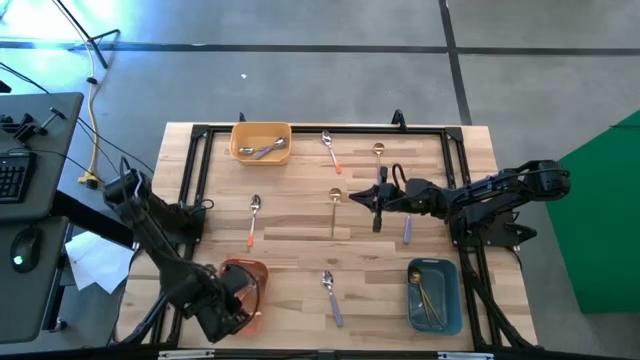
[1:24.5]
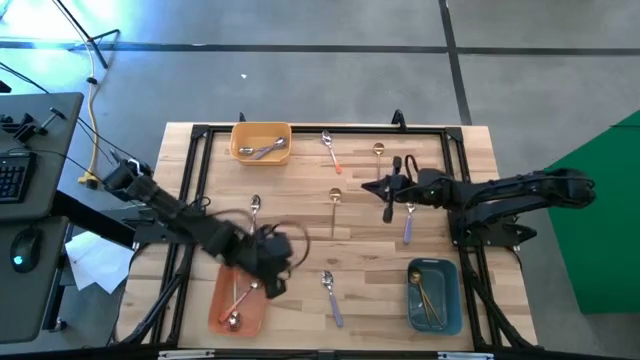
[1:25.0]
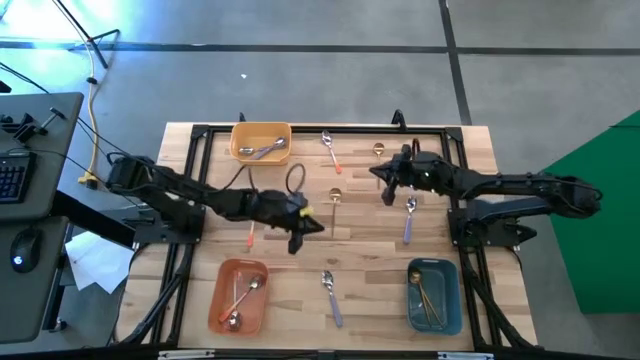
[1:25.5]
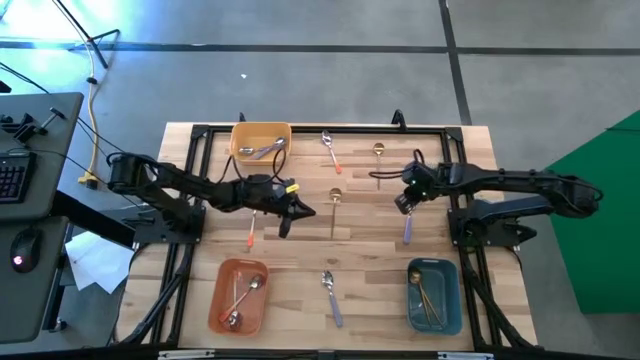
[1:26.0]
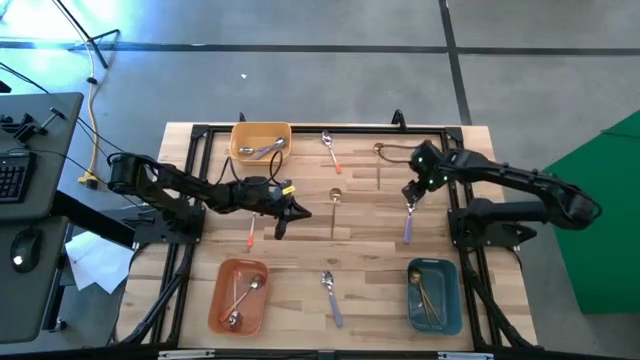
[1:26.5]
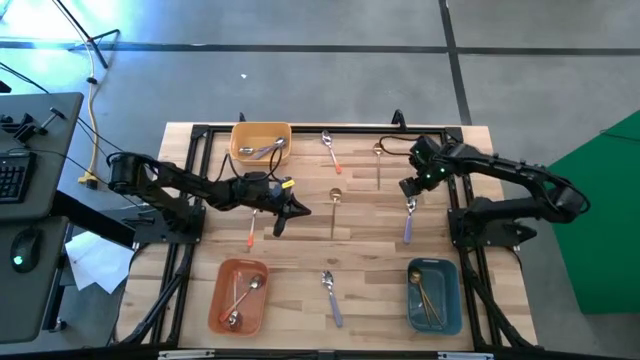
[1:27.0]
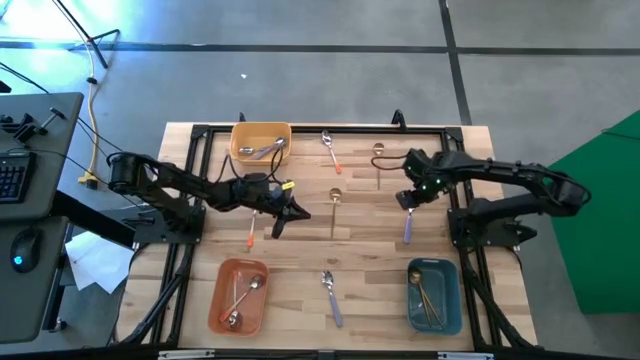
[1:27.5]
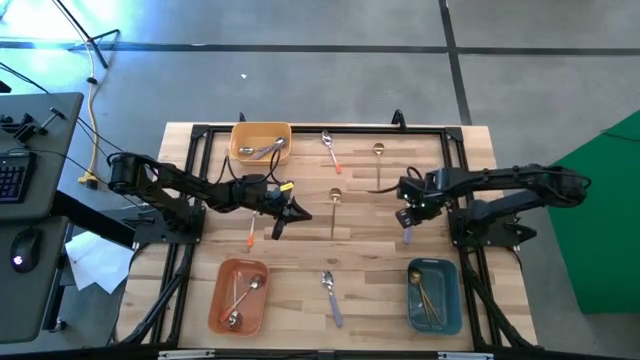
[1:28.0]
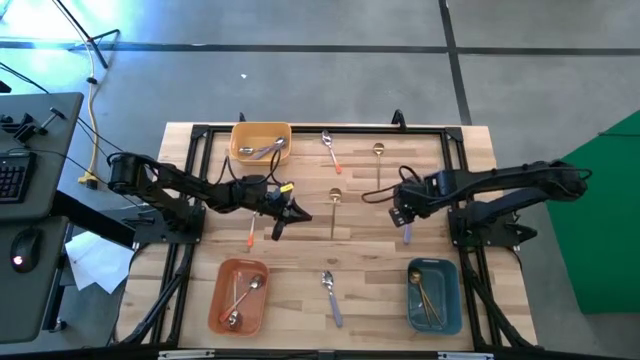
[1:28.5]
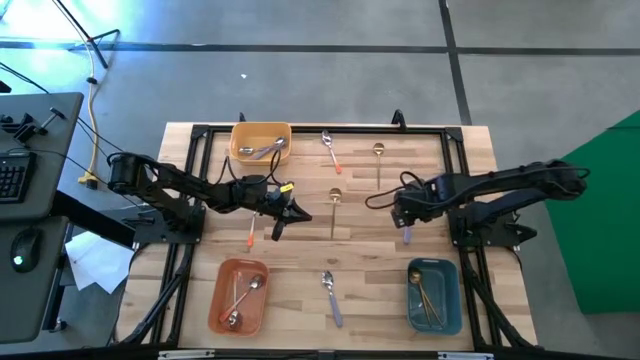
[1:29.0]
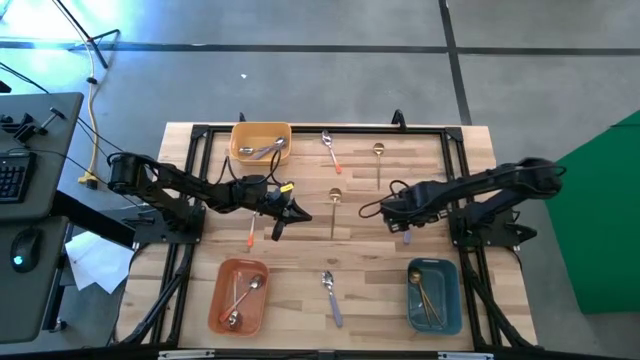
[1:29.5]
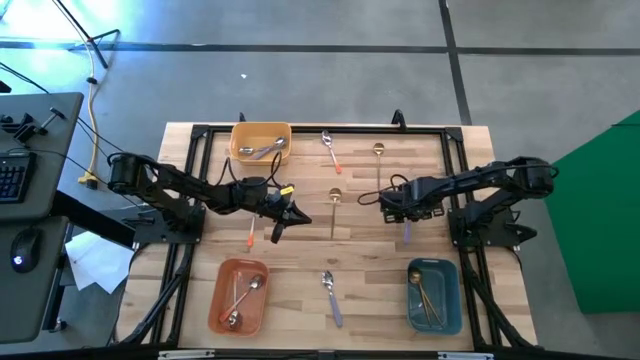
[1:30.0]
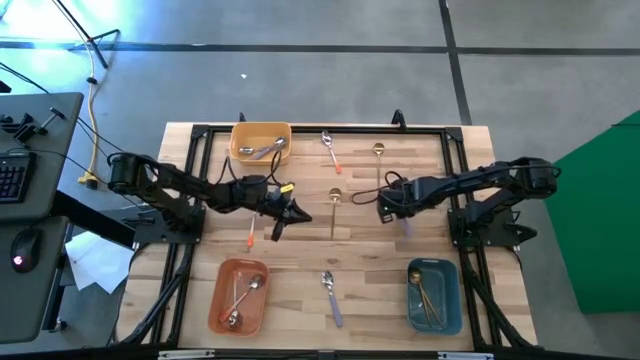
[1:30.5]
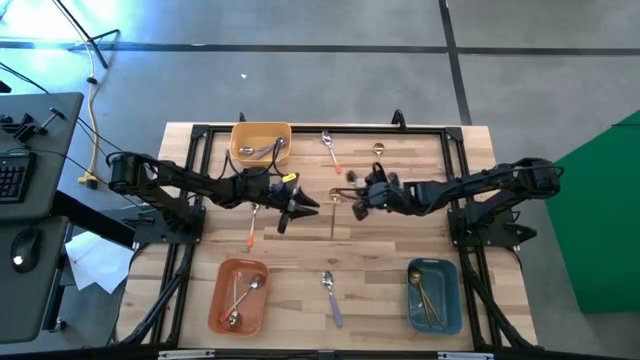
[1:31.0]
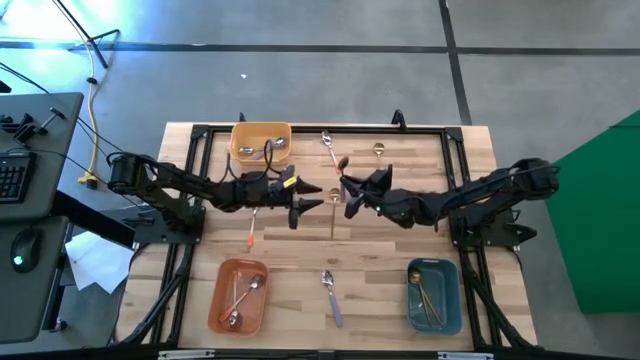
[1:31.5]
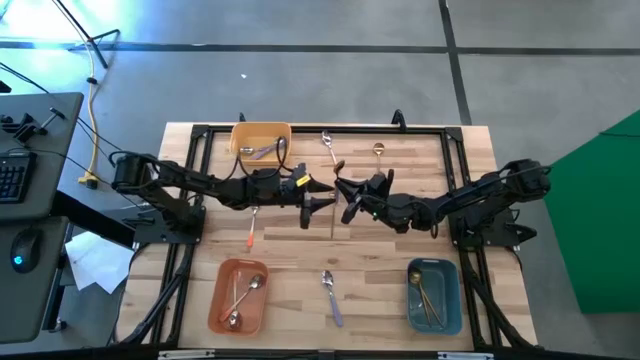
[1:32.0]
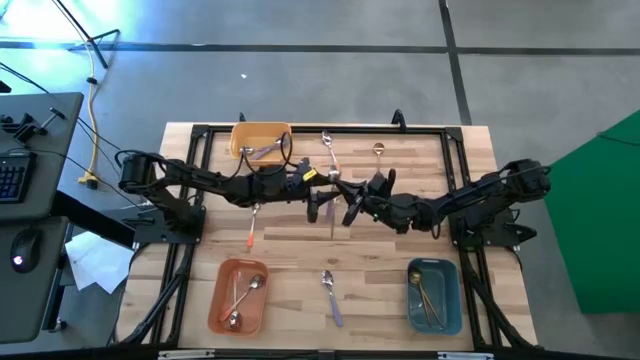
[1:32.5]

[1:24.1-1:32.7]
Task: Sort silverware by color (type)
Put the purple spoon into the yellow bin

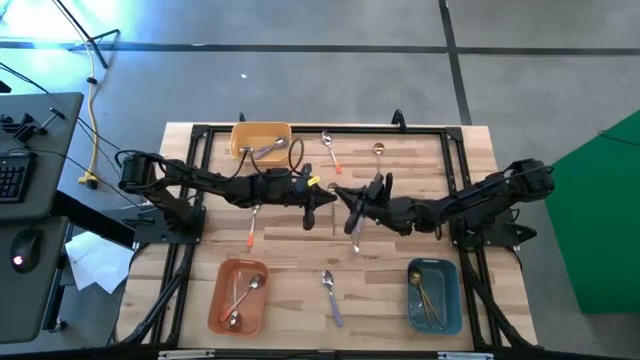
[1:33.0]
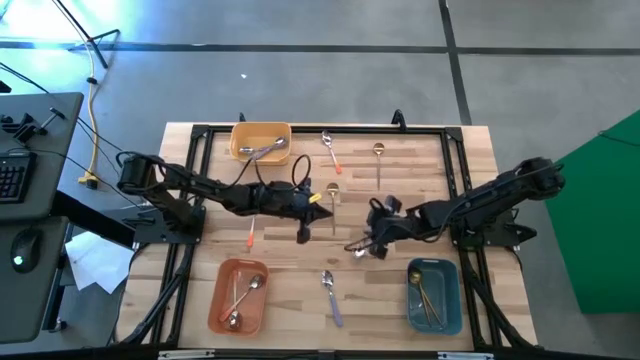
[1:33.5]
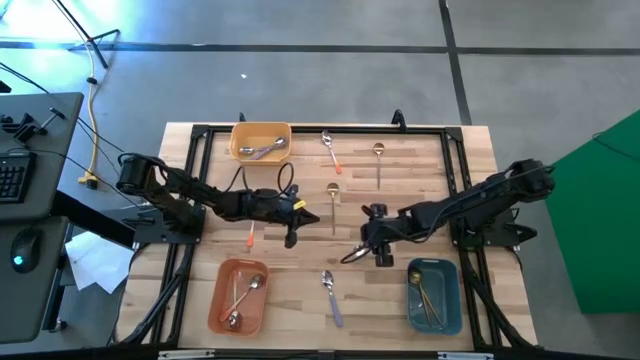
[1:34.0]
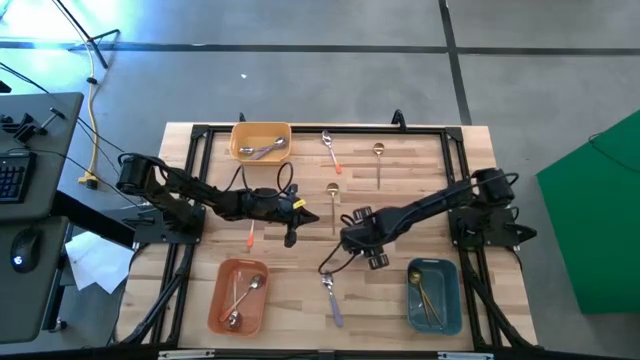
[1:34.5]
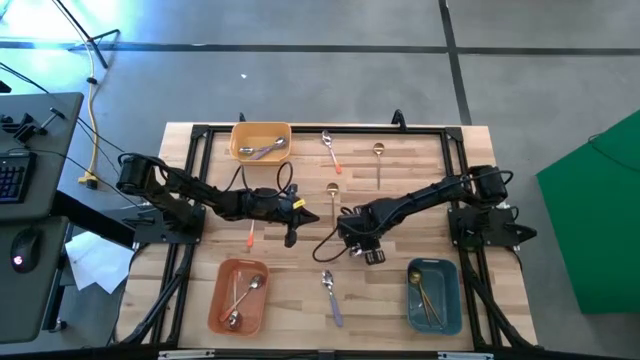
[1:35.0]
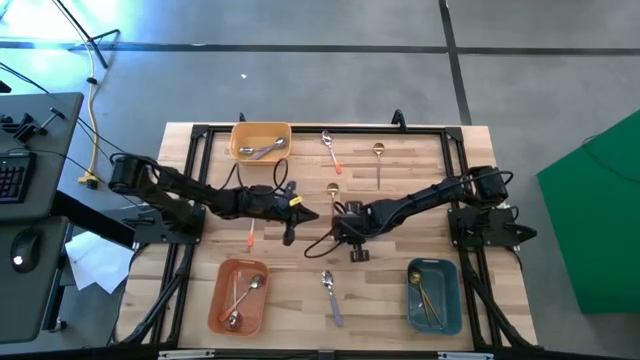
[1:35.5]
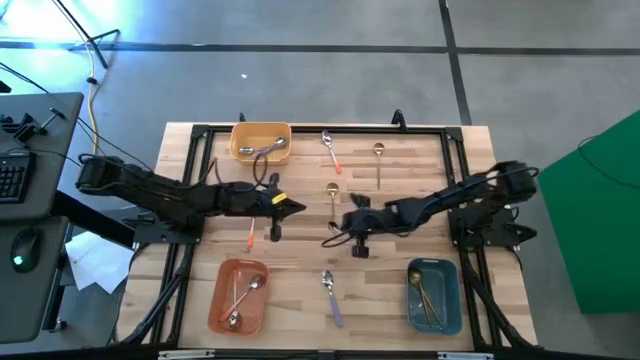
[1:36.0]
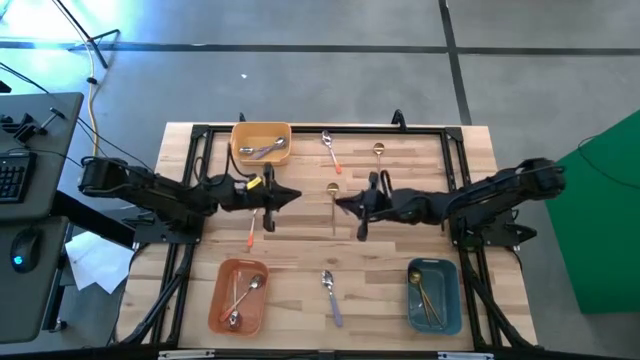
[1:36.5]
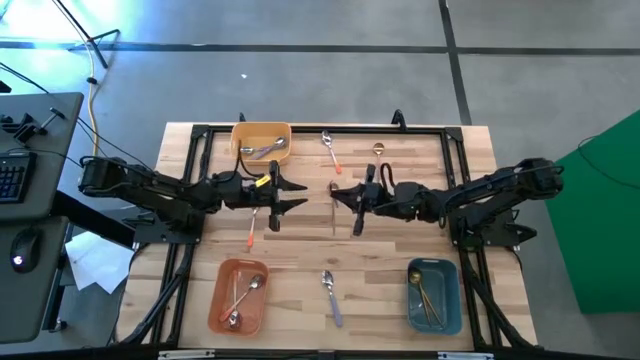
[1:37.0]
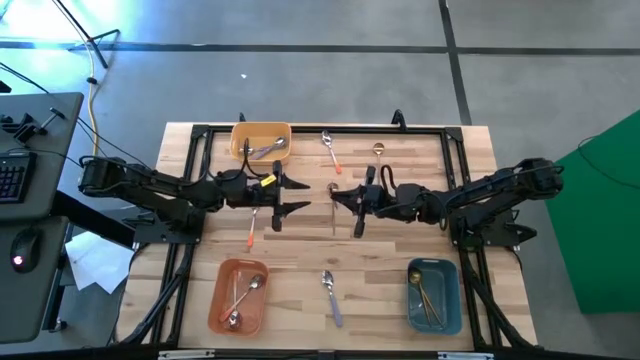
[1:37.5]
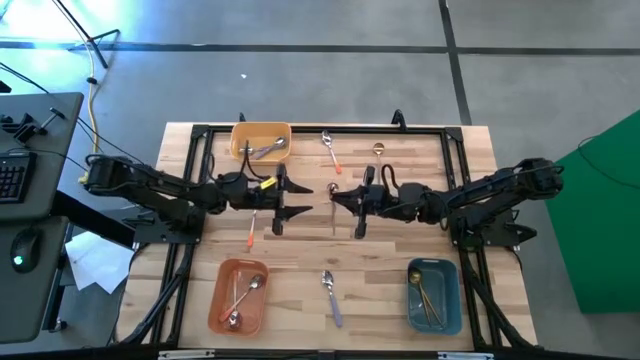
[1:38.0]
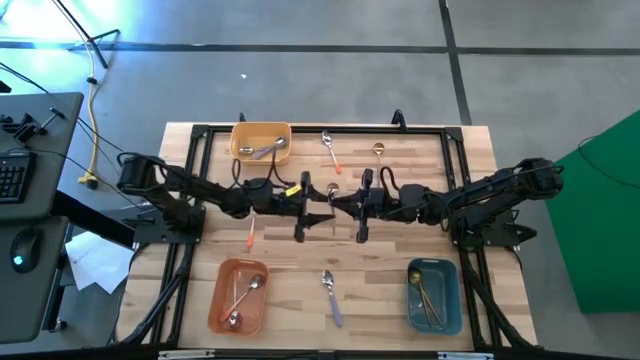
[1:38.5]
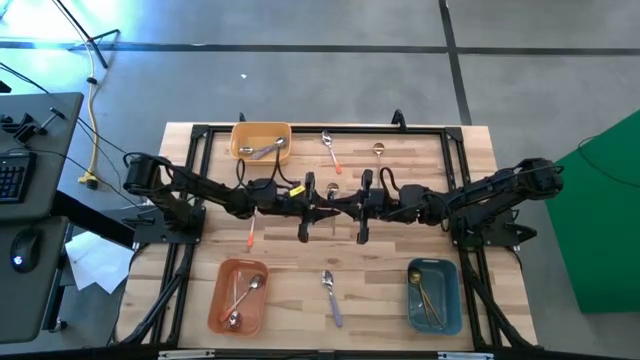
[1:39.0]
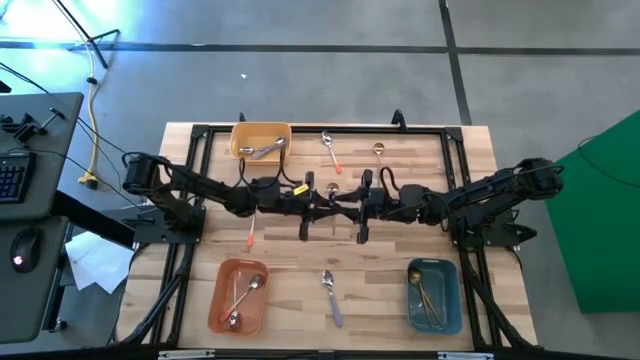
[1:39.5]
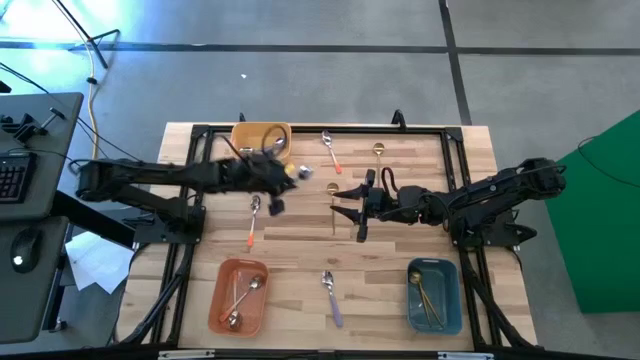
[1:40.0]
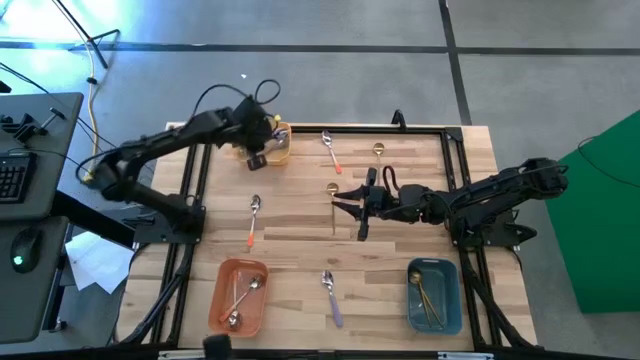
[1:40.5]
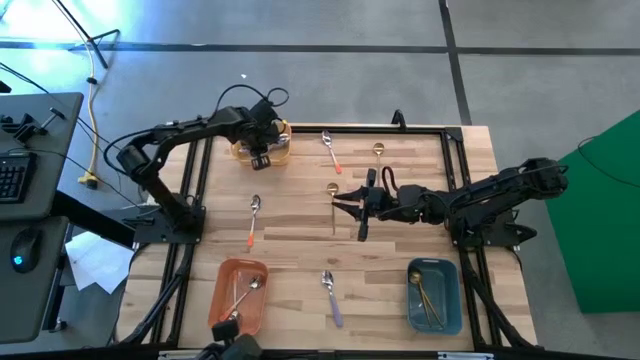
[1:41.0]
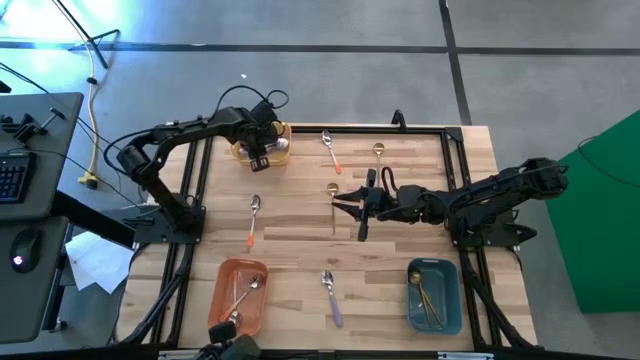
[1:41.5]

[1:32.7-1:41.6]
Put the purple spoon into the yellow bin

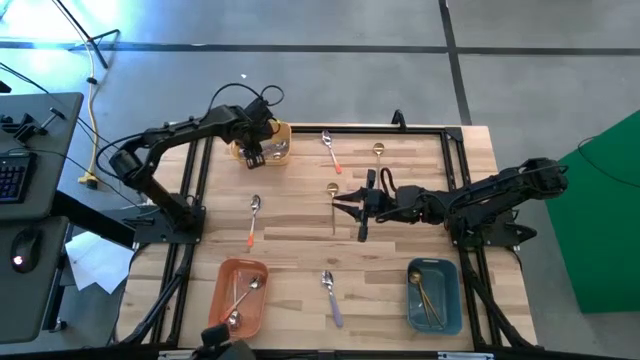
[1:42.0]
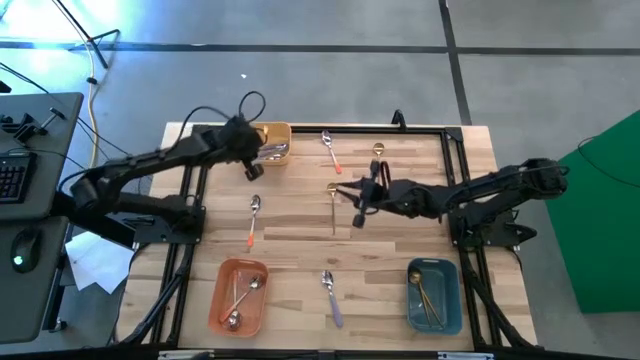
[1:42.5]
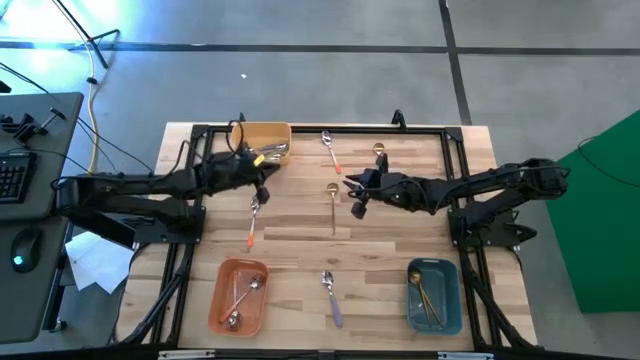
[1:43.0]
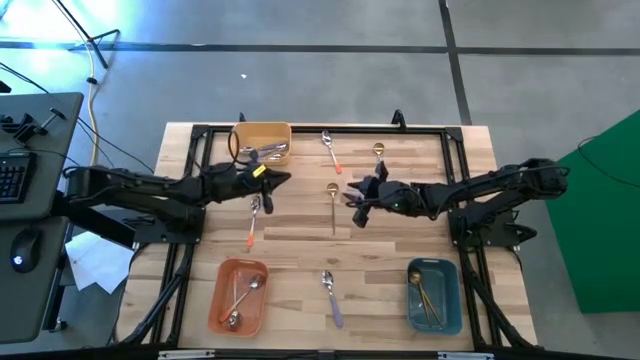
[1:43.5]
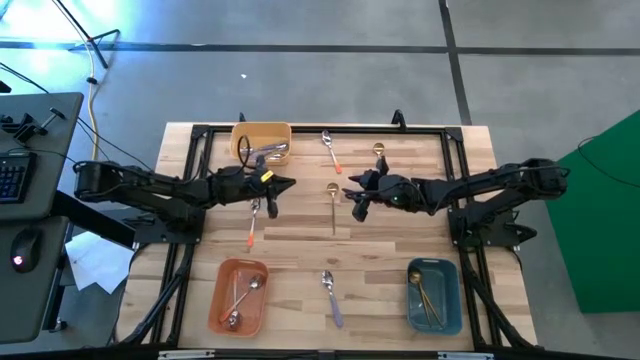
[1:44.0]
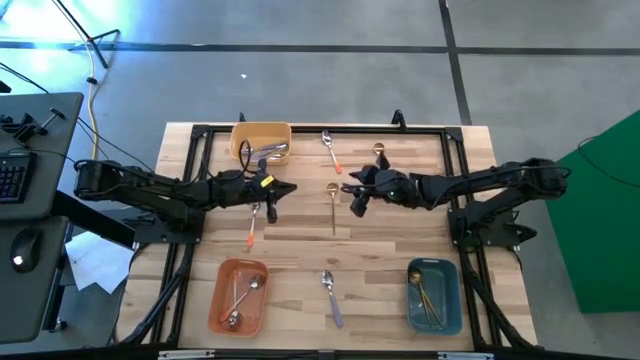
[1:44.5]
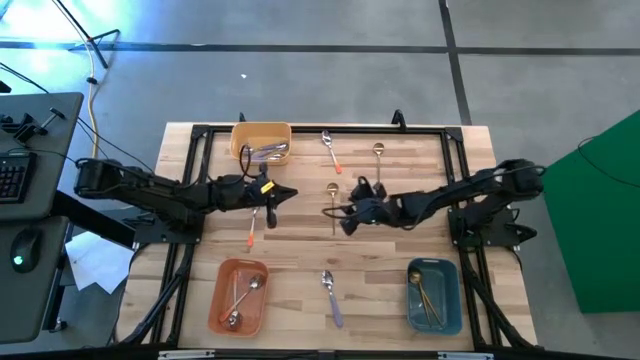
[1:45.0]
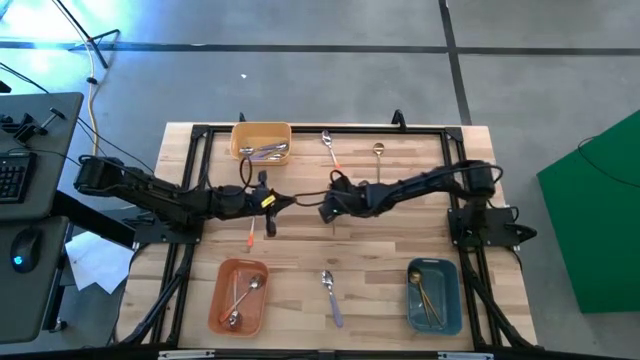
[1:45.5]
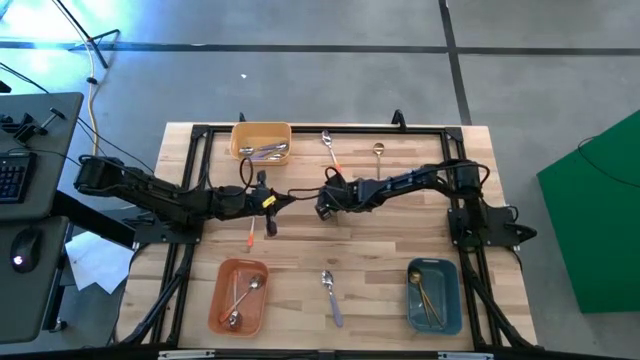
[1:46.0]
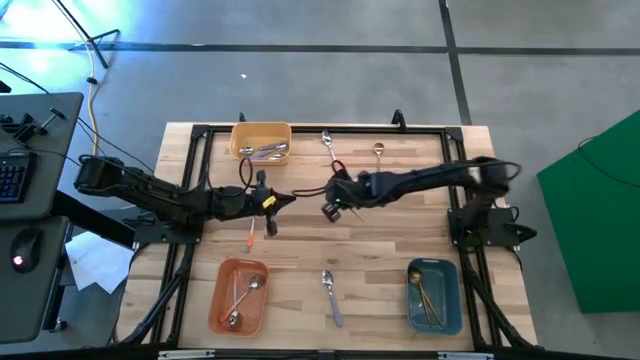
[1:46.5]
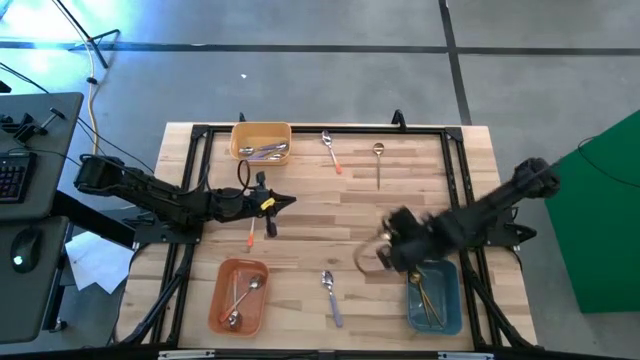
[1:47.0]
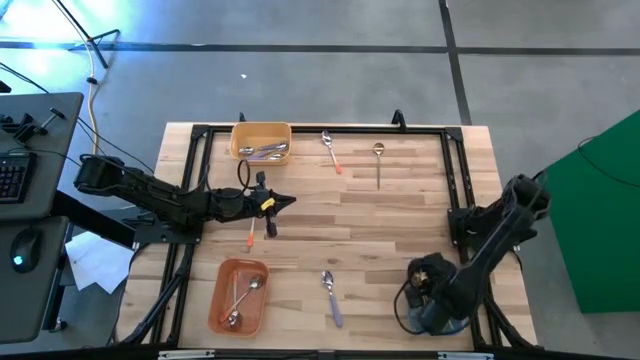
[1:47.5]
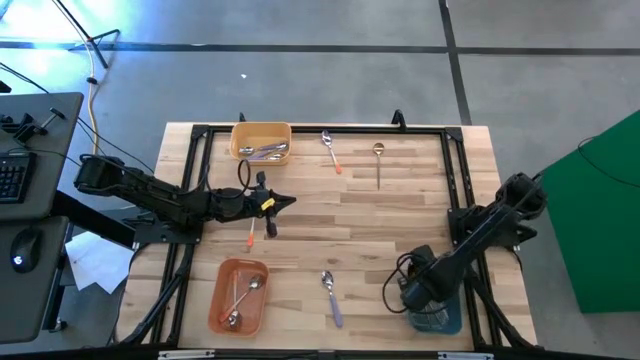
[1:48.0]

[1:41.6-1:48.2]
Put the golden spoon into the blue bin
